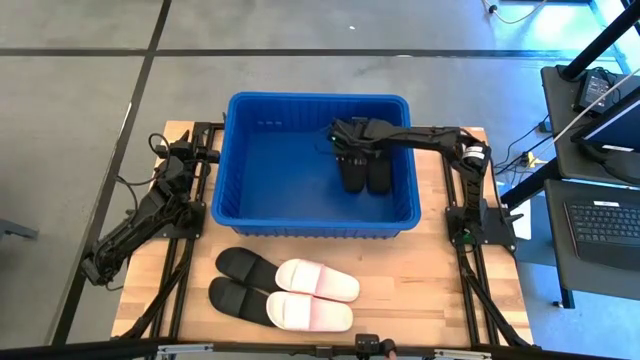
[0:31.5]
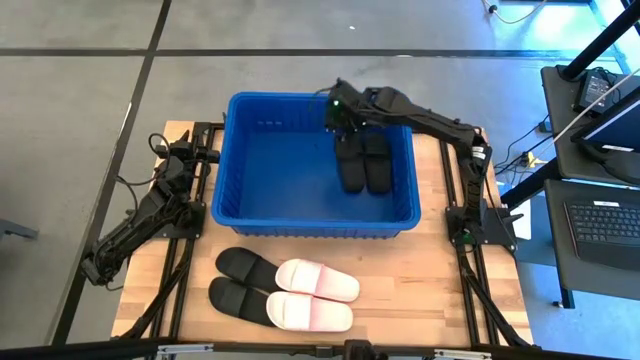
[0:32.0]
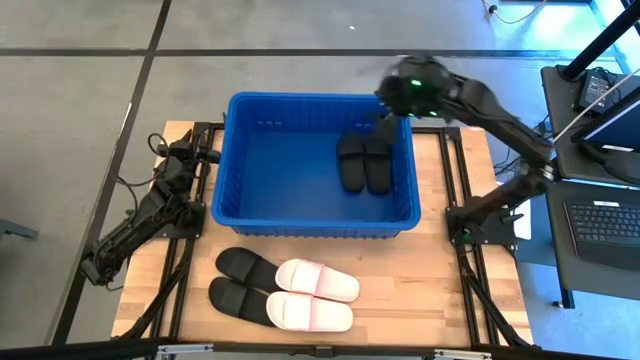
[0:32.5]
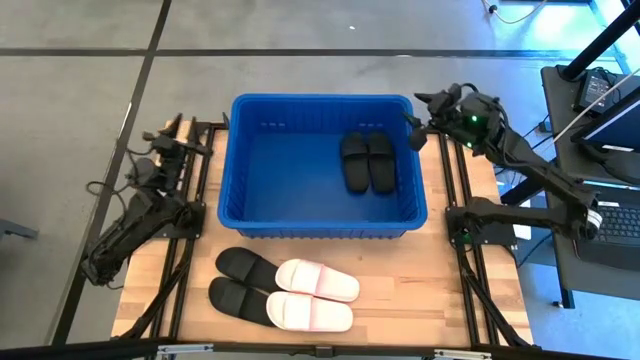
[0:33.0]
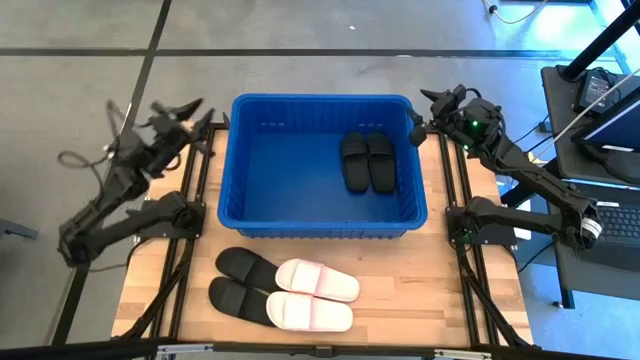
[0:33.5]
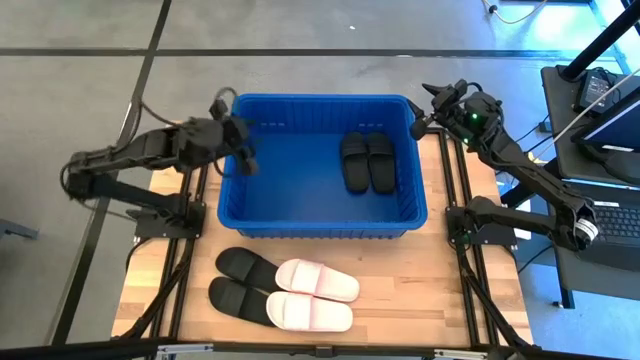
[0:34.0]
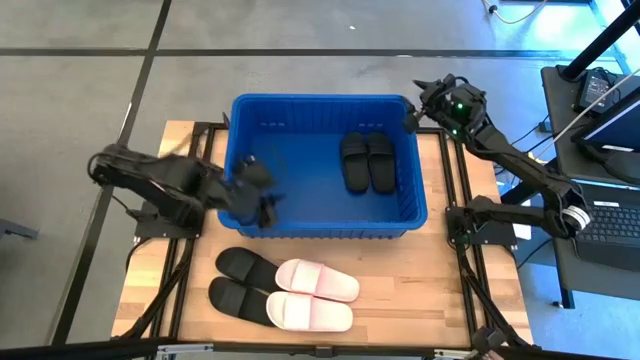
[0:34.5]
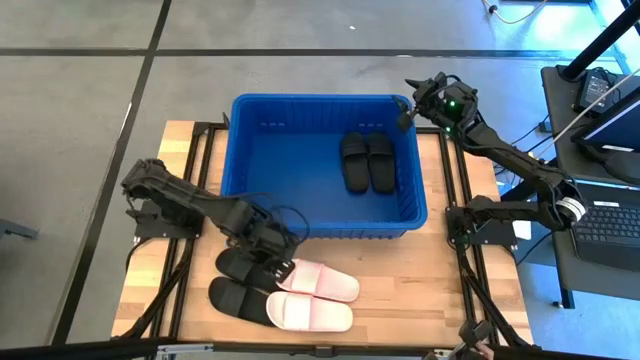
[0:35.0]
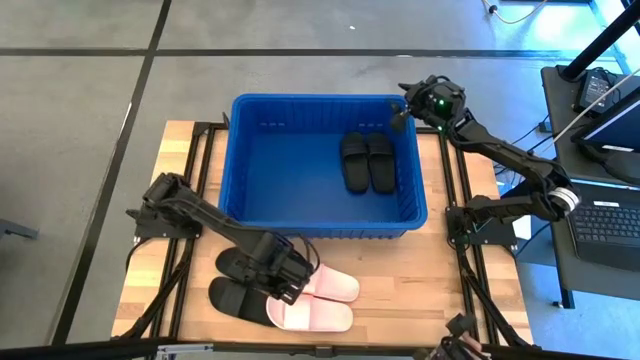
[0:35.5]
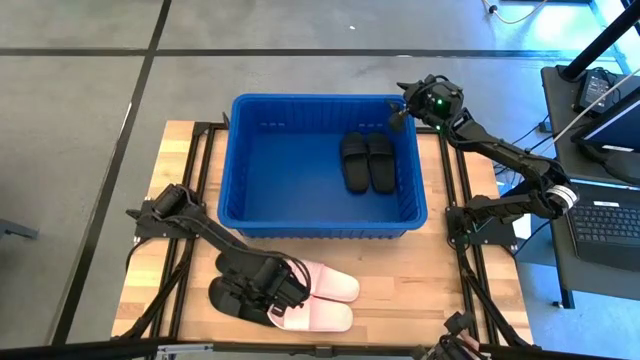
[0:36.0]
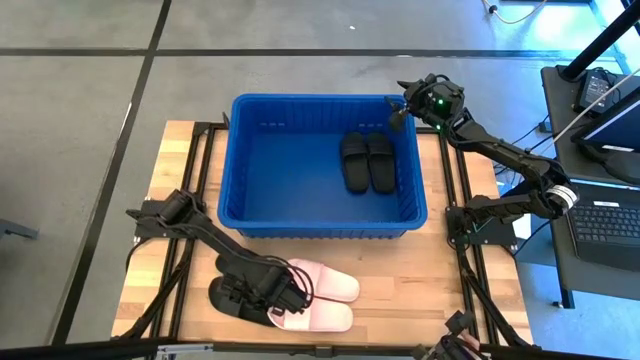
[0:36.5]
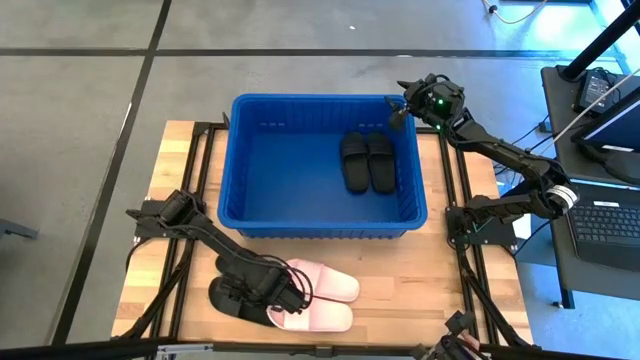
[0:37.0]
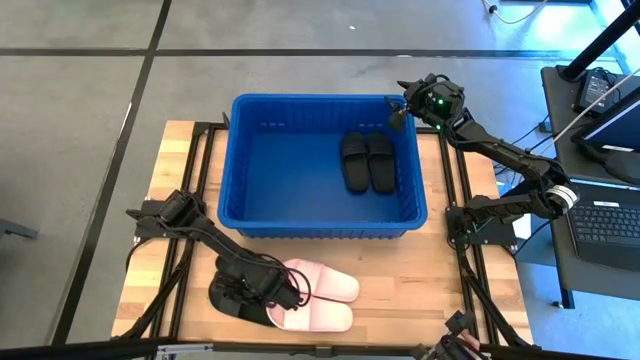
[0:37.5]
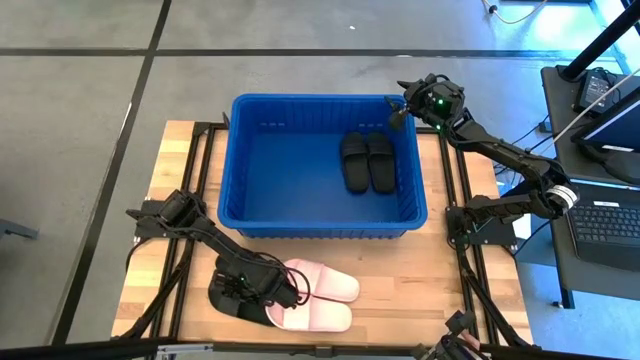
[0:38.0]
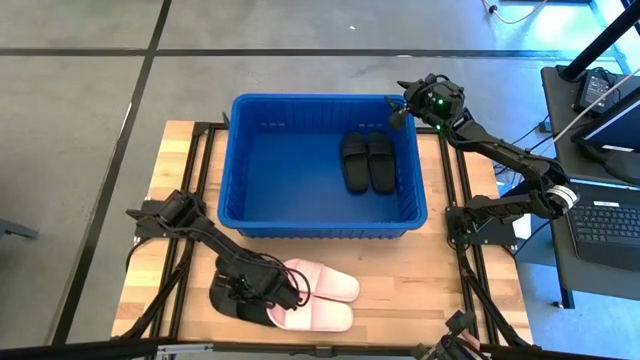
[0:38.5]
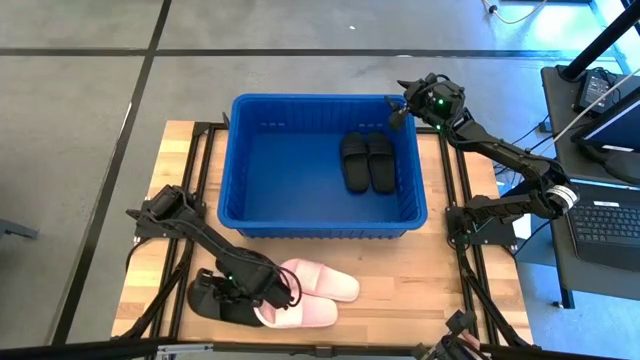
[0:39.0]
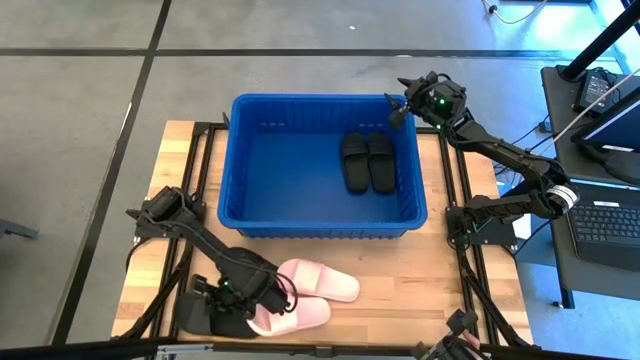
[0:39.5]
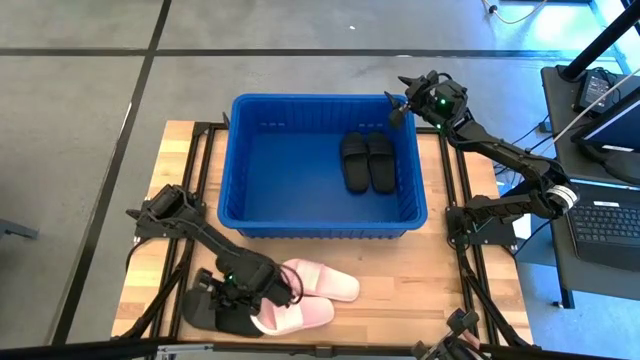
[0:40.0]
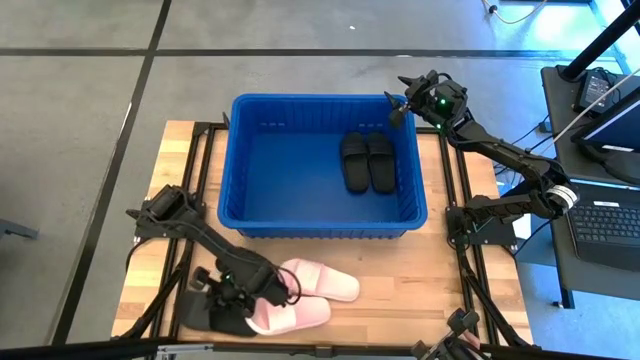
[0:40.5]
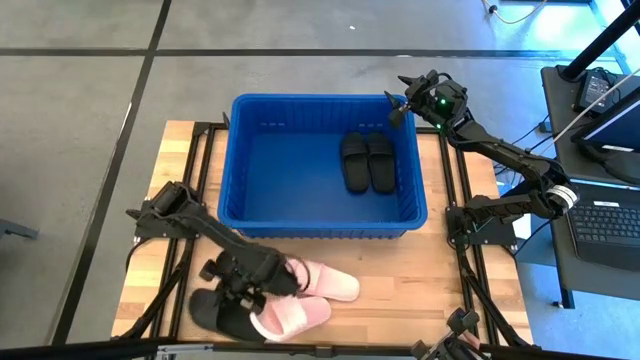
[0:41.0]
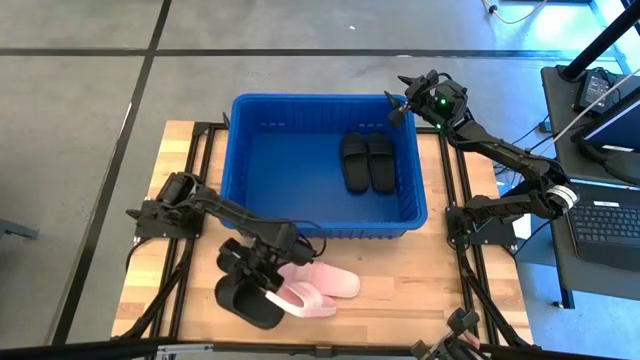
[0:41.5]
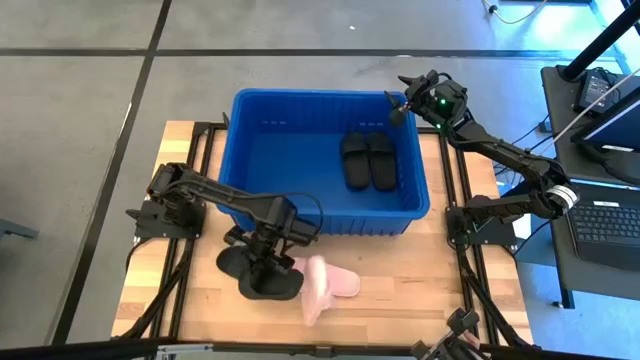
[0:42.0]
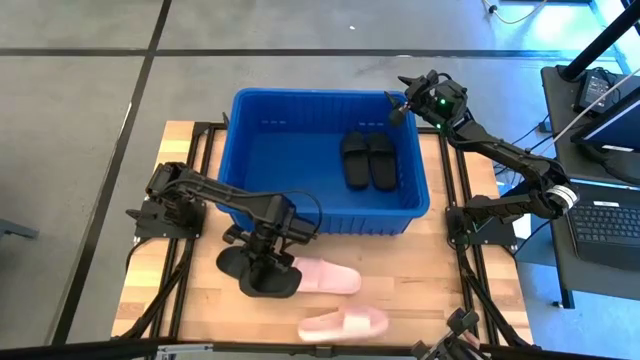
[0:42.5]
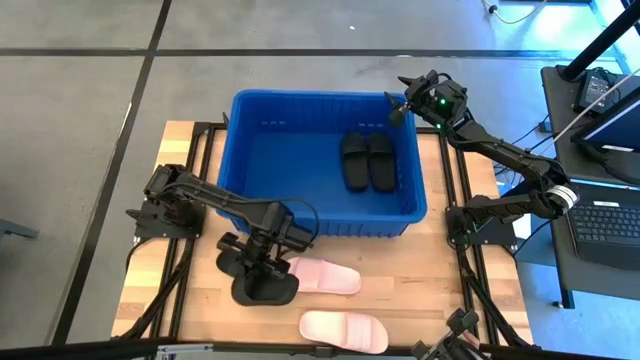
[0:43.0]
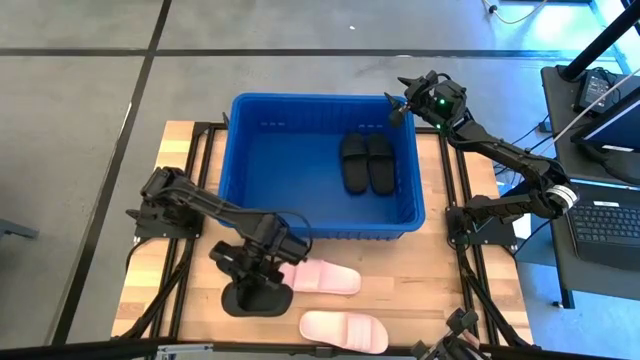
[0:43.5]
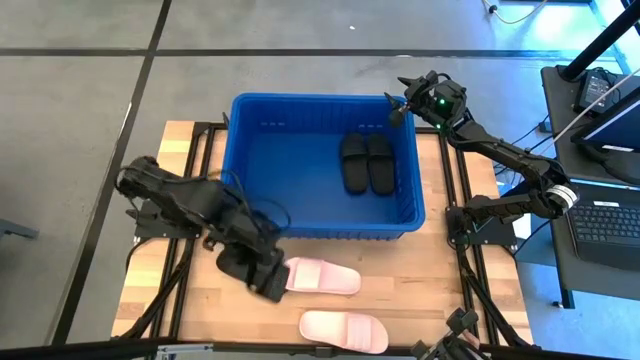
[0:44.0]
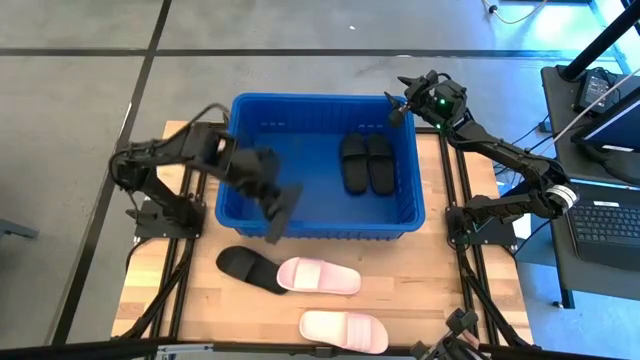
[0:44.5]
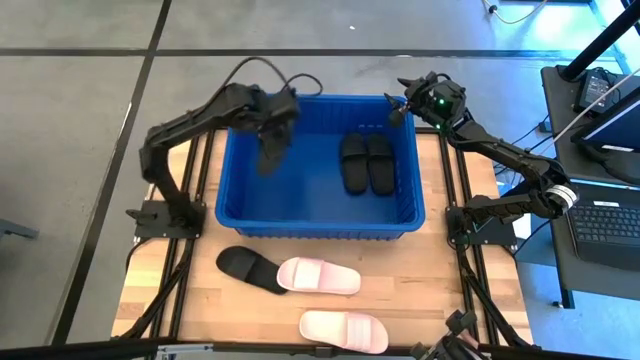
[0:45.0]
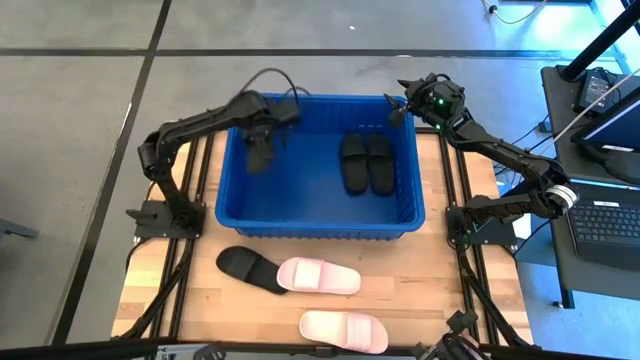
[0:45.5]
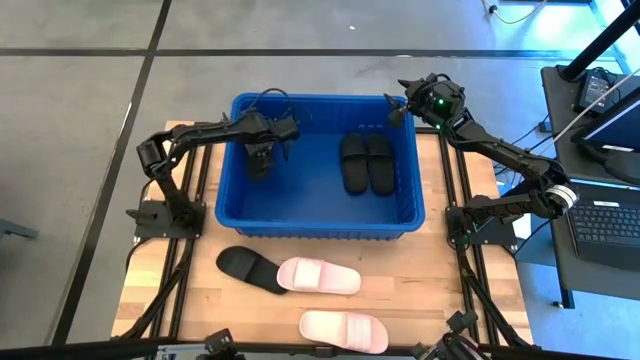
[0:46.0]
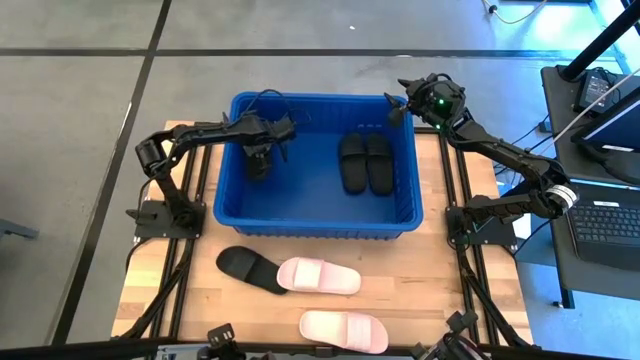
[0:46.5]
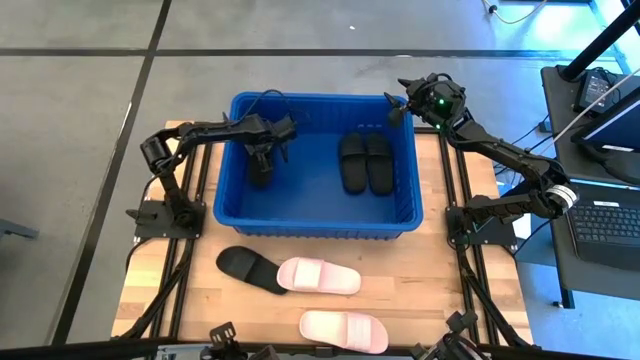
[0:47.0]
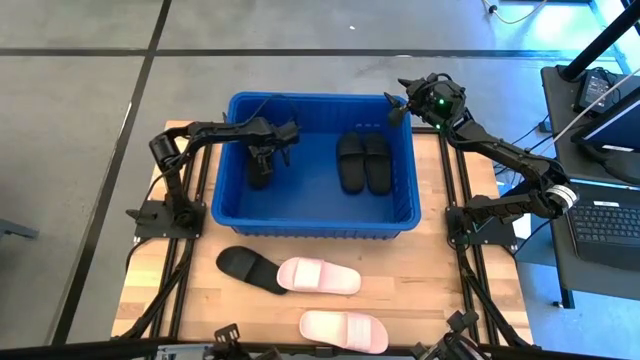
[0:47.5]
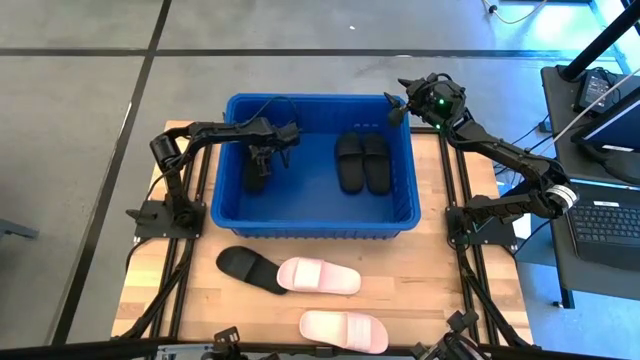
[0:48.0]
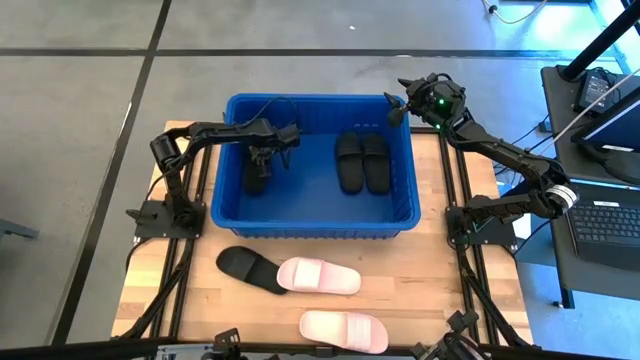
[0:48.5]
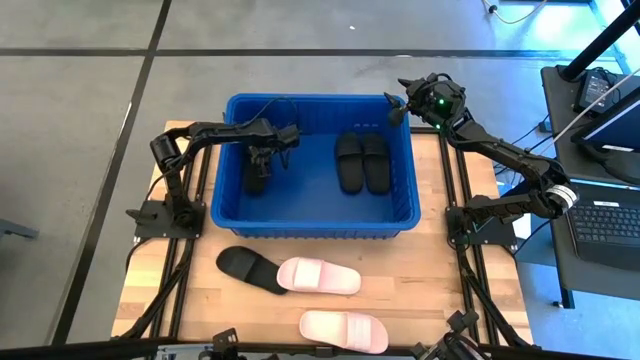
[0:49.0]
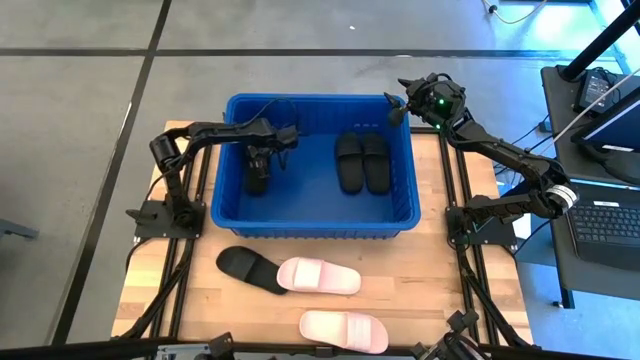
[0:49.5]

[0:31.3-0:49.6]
Task: Pick and place slides into bin
Put the black slide into the blue container

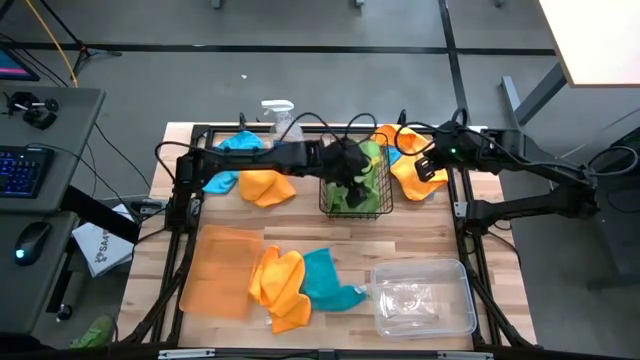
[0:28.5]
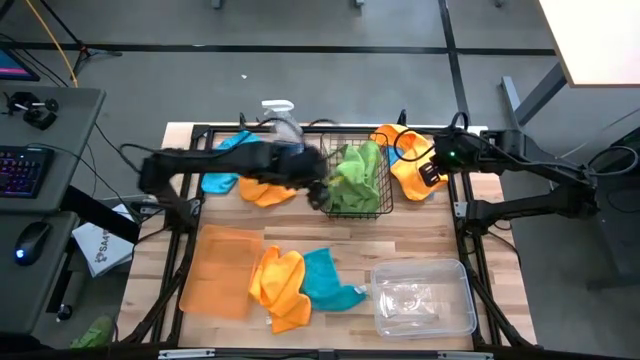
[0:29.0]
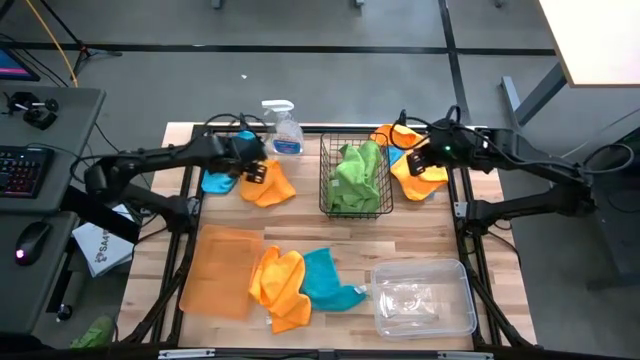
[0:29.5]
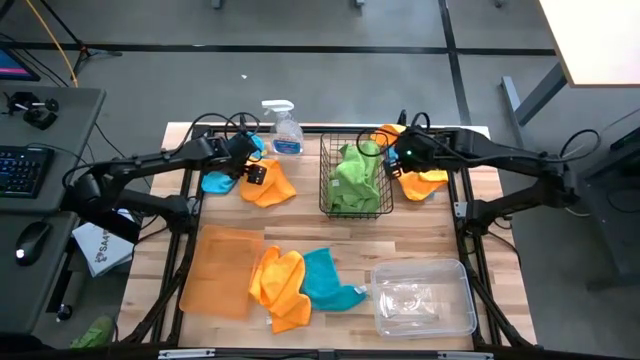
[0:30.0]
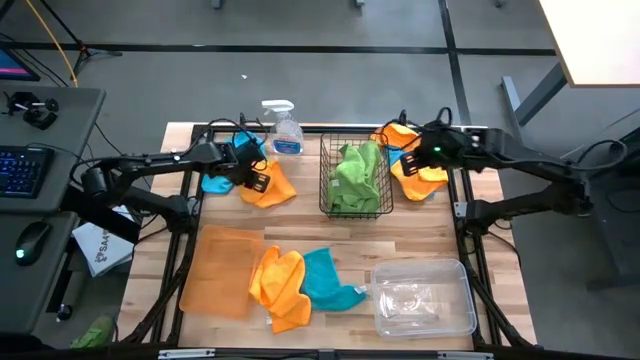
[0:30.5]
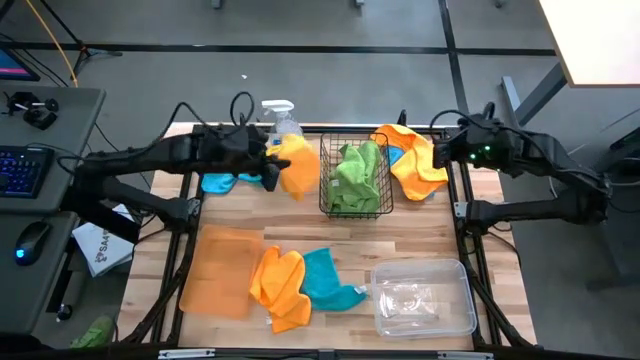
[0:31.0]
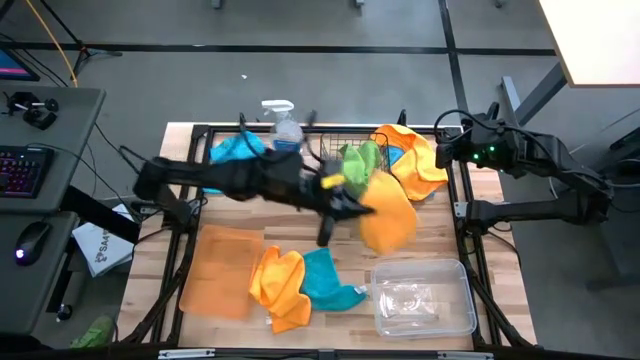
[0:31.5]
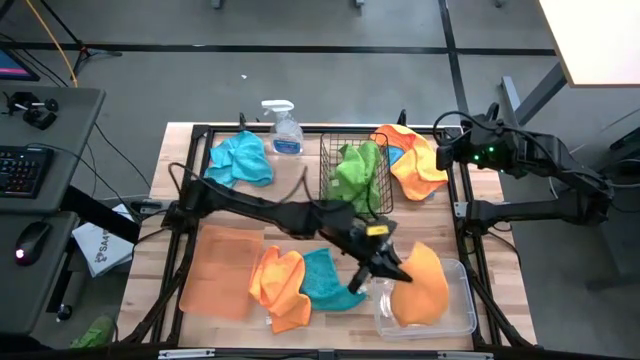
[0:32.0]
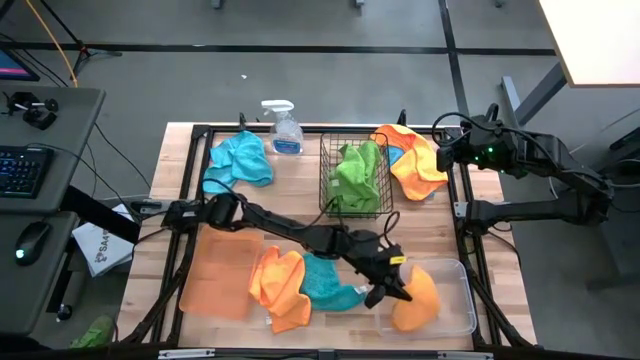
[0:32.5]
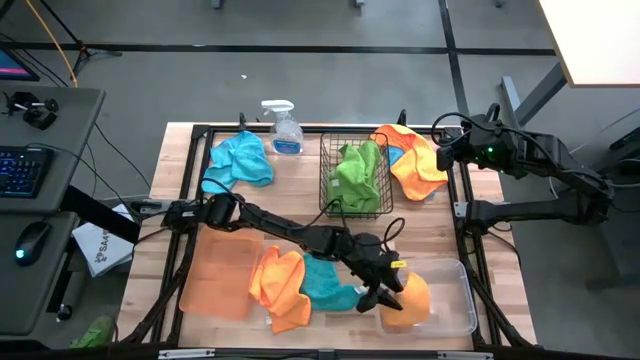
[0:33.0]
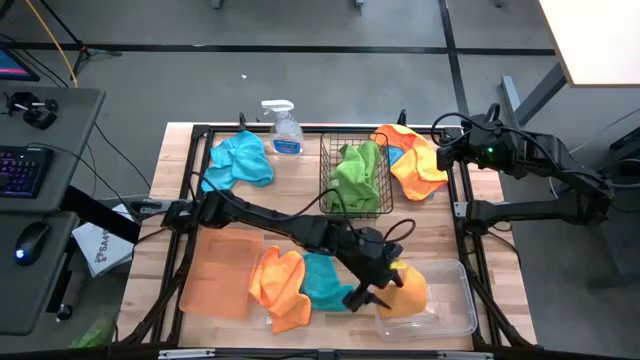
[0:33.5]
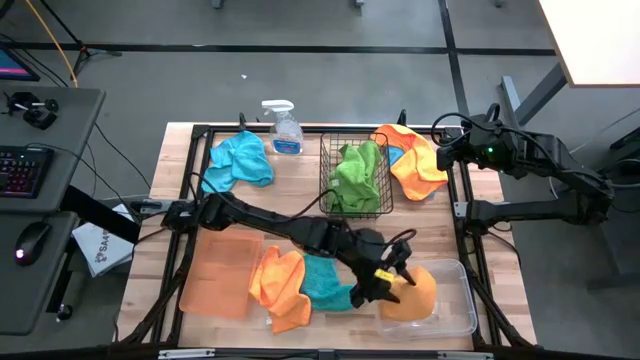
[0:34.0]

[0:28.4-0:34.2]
Task: Sort microfiber towel by color & place in baskets
Put the top left orange microfiber cloth into the transparent bin
